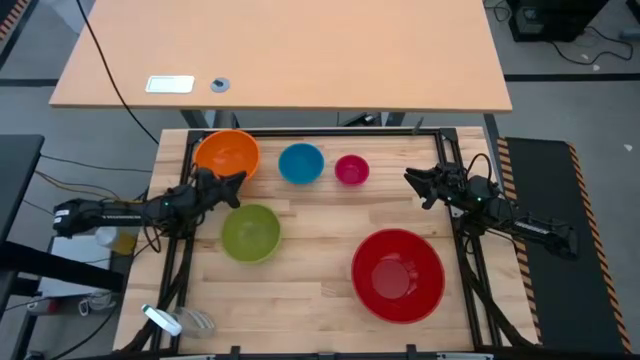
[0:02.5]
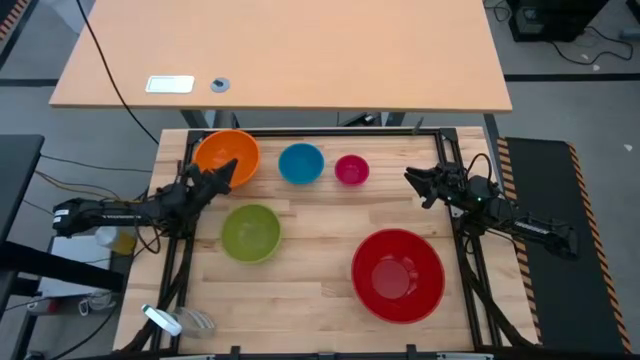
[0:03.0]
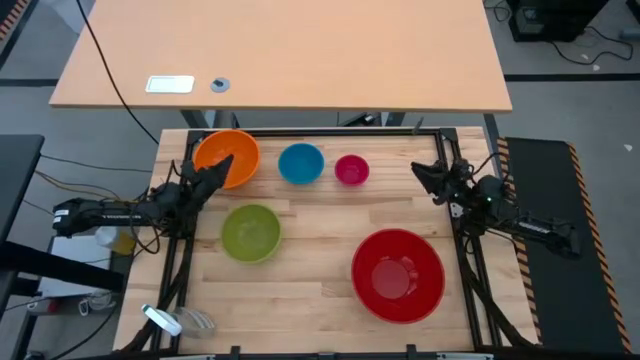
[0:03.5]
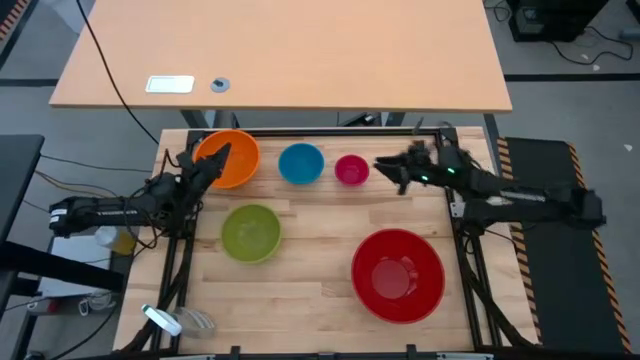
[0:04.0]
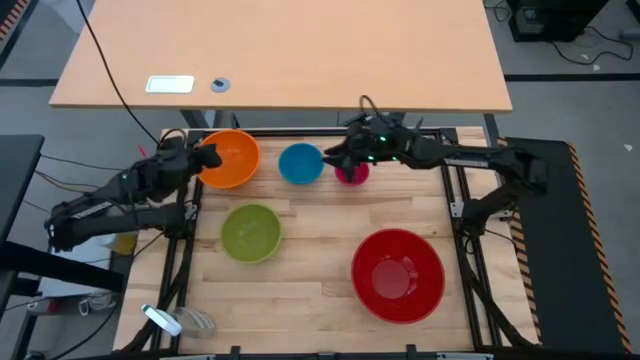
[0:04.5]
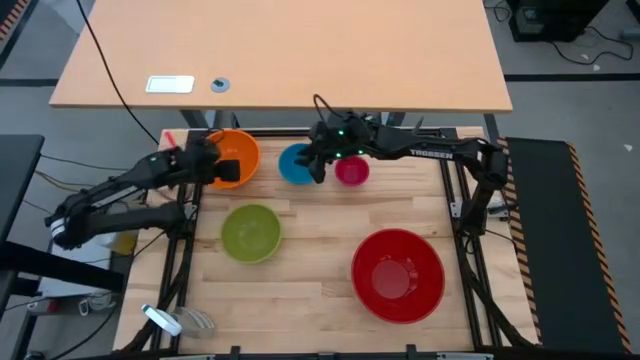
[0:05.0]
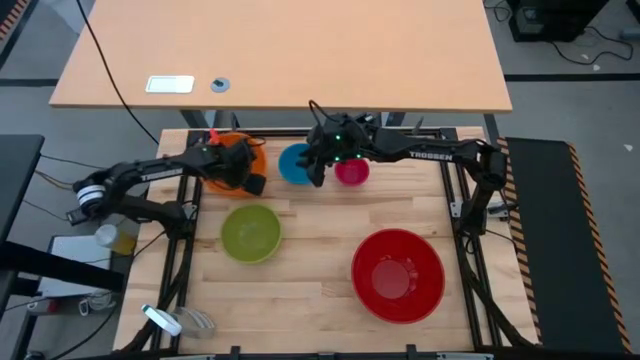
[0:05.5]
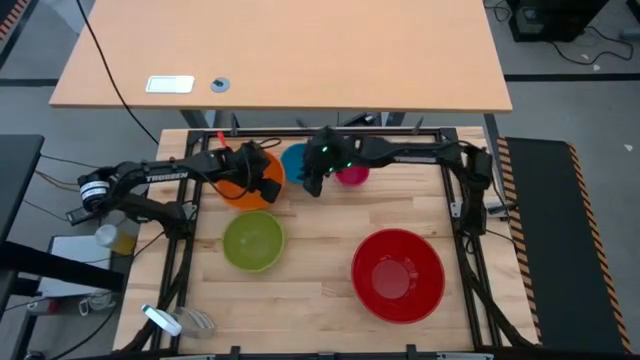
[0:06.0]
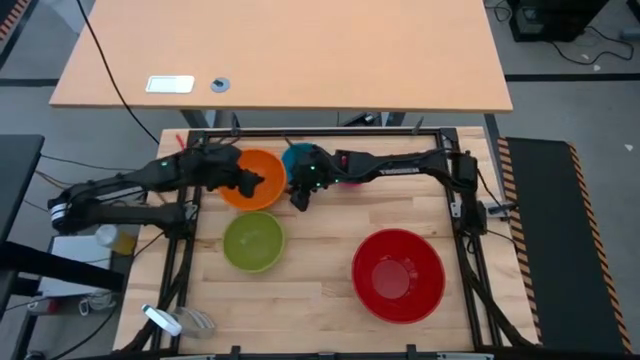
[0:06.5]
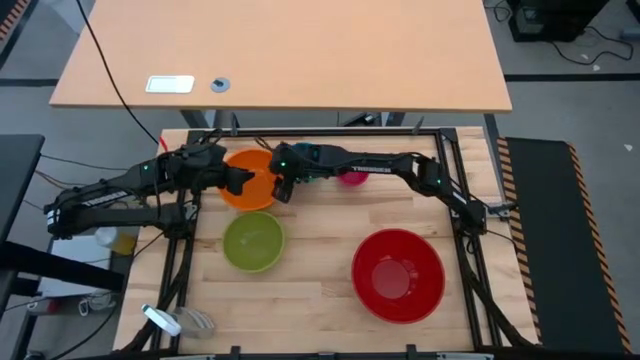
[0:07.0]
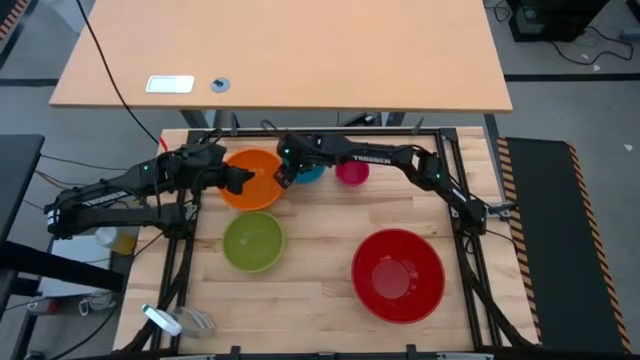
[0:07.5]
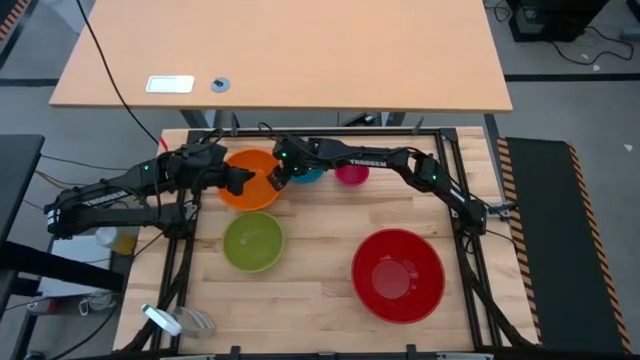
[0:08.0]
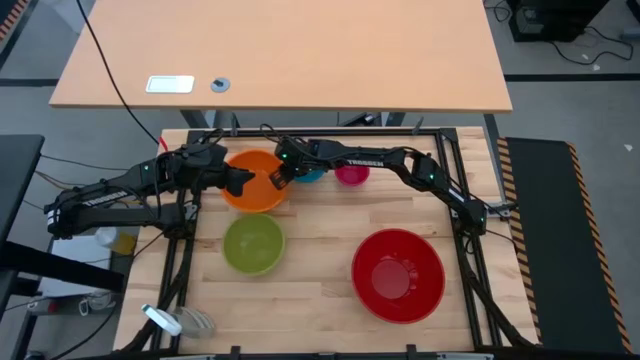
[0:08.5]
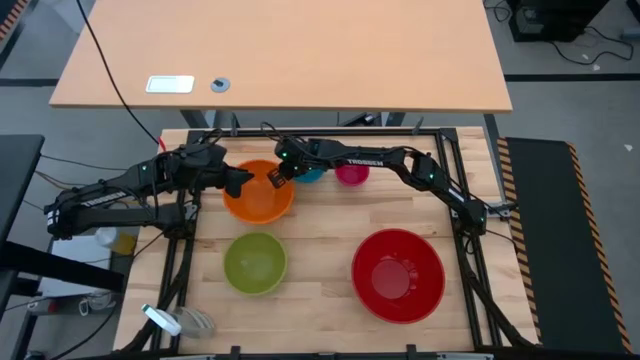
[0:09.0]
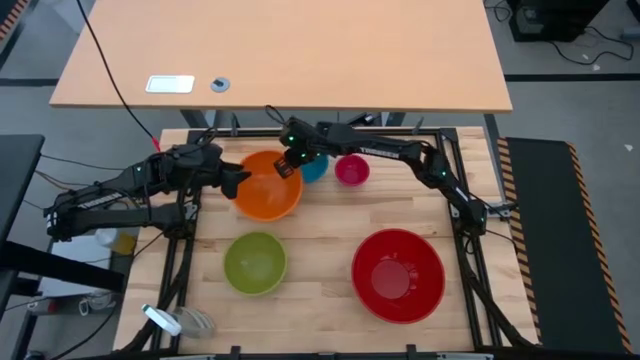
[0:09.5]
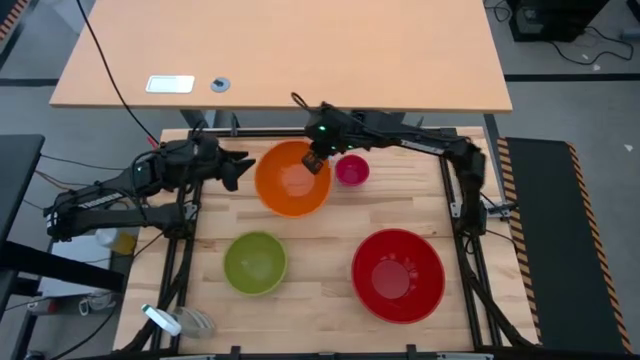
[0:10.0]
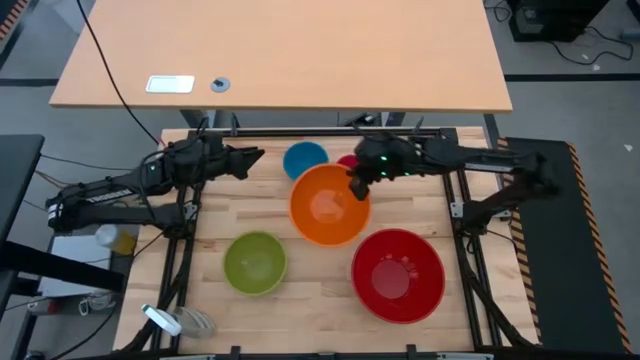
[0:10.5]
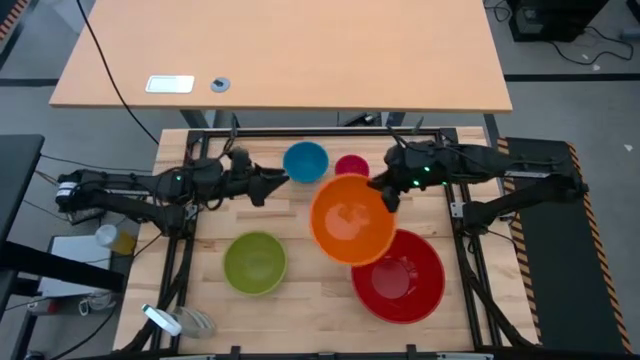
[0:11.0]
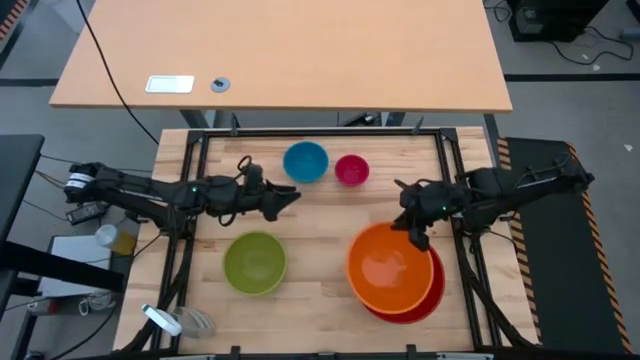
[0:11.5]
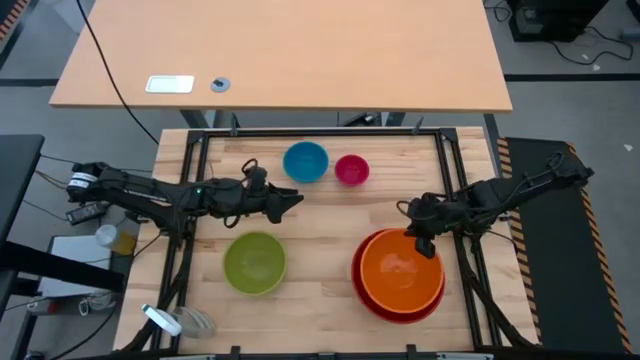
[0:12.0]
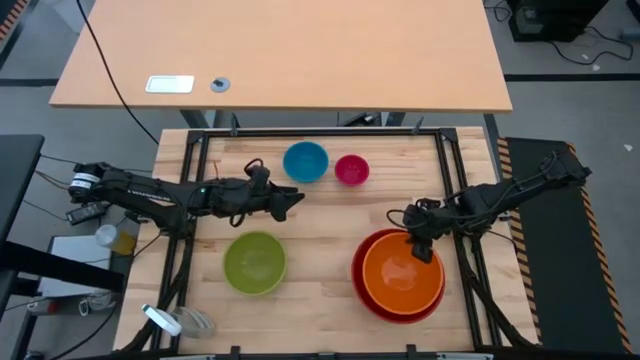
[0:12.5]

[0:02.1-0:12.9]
Stack the orange bowl on top of the red bowl

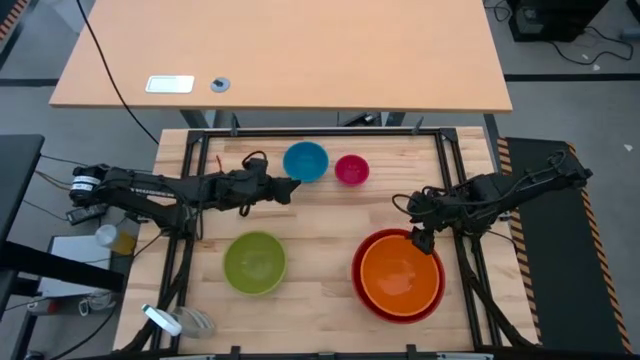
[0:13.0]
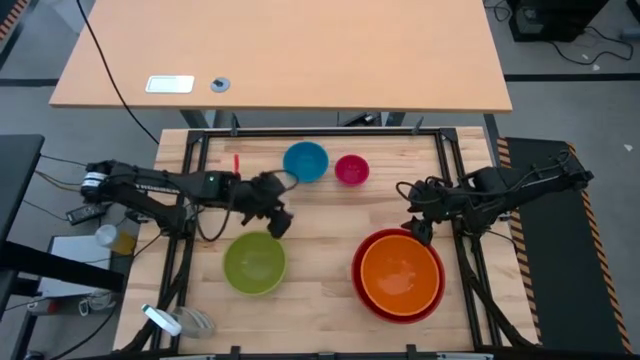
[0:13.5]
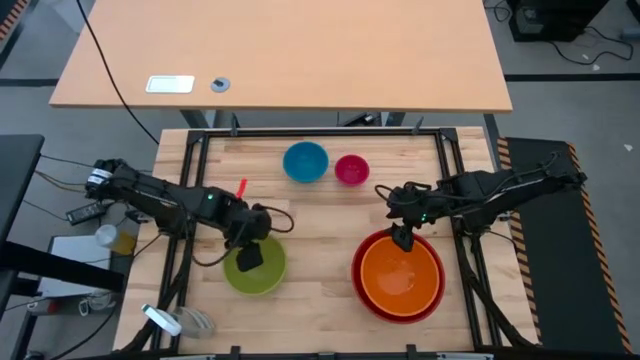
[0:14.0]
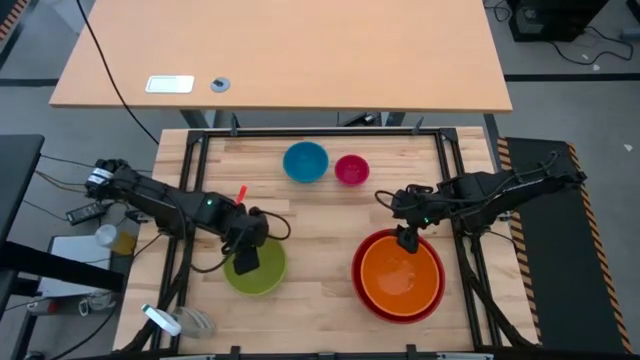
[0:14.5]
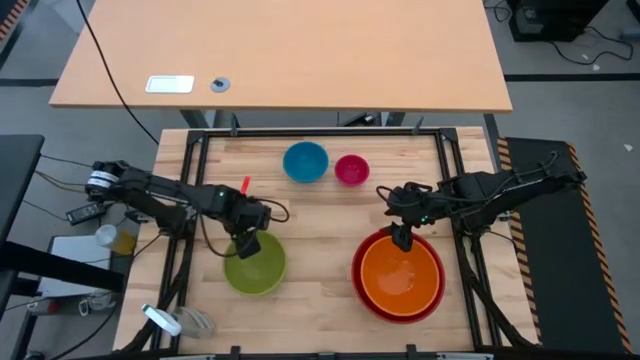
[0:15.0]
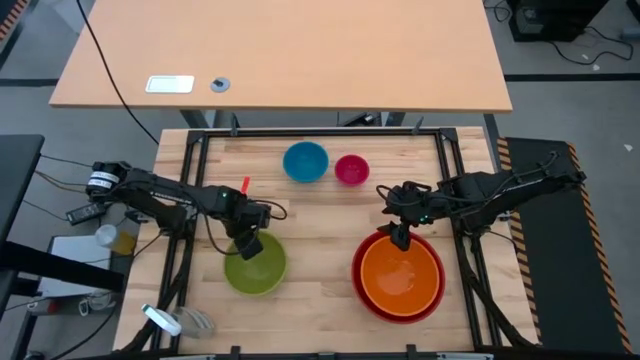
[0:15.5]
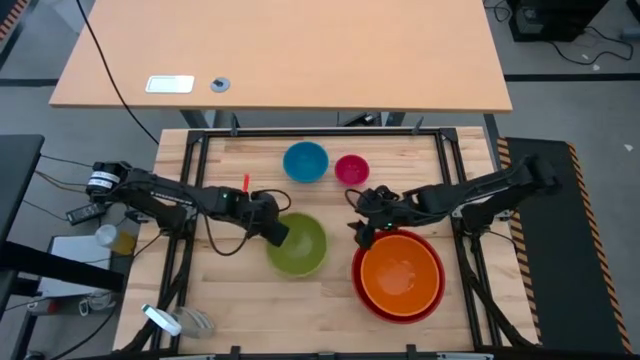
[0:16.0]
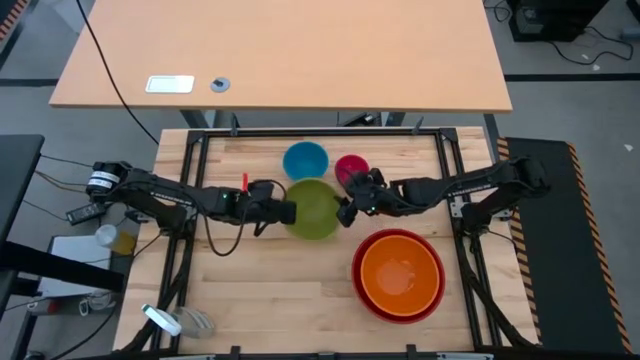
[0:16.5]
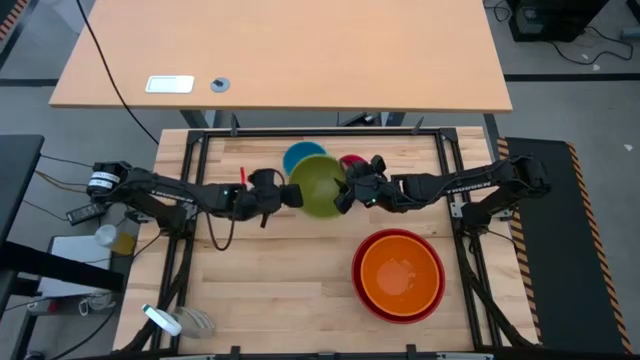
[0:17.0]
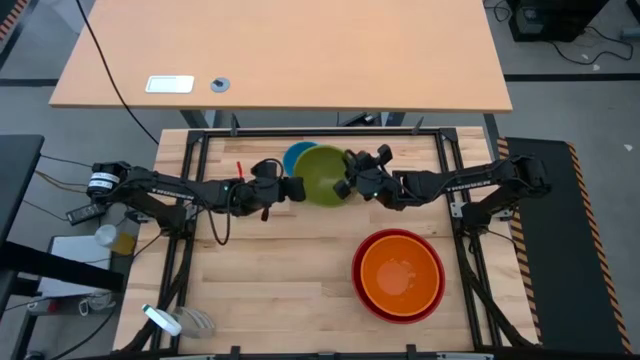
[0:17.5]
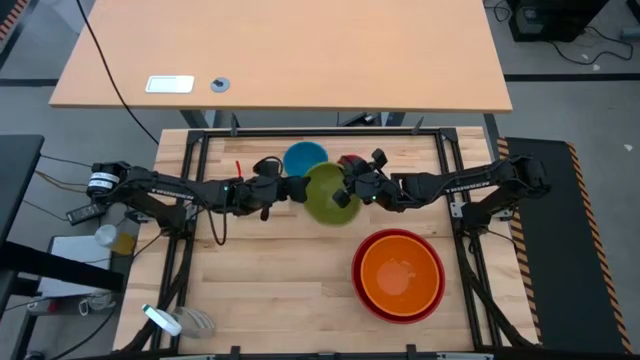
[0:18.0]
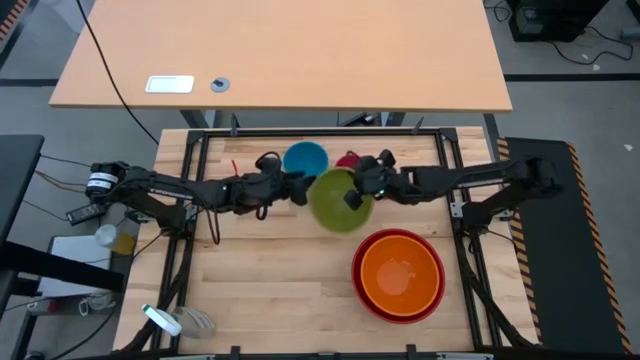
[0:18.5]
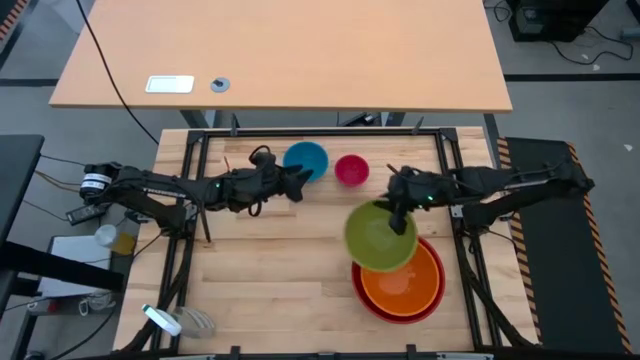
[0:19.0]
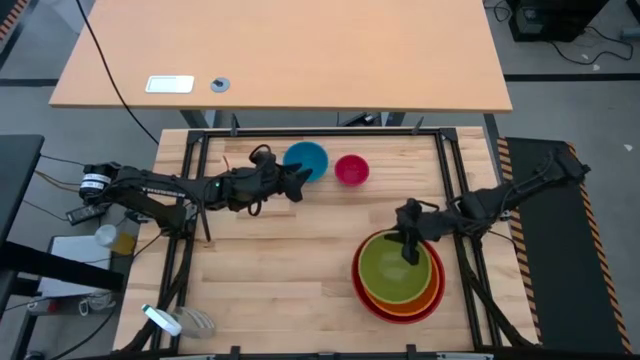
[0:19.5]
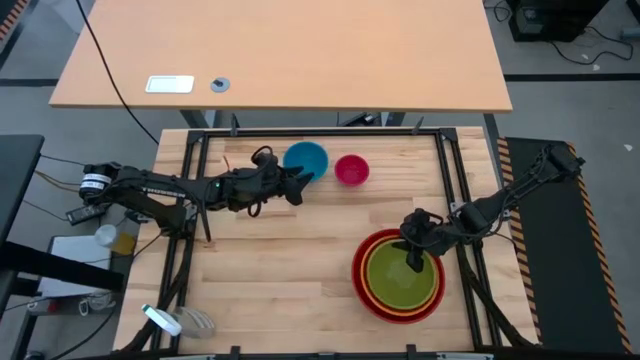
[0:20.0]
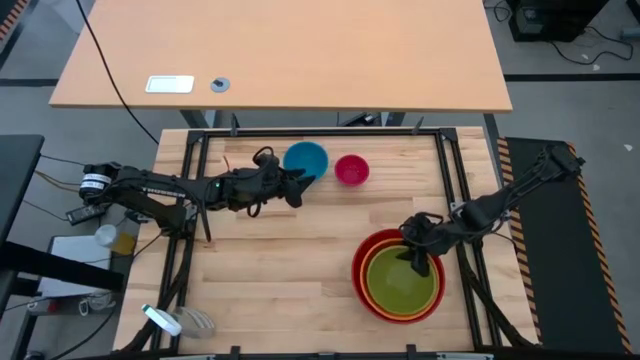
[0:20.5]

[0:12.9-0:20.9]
Stack the green bowl on top of the orange bowl
